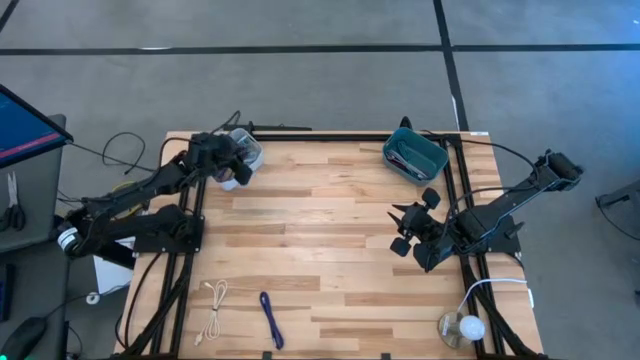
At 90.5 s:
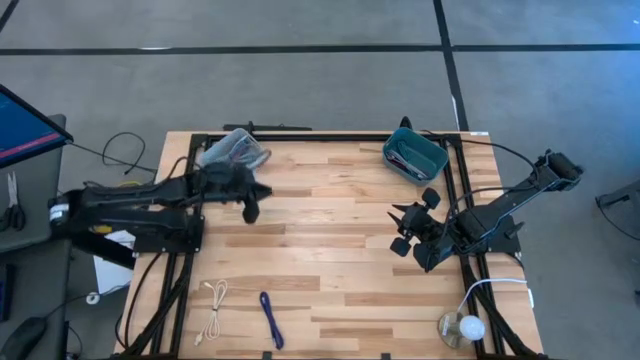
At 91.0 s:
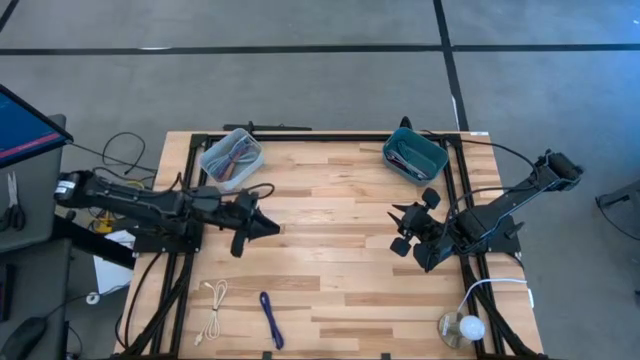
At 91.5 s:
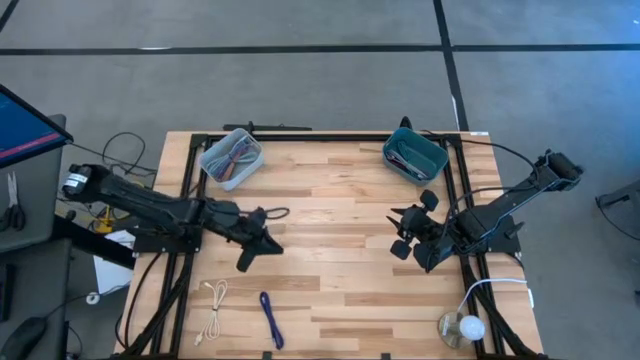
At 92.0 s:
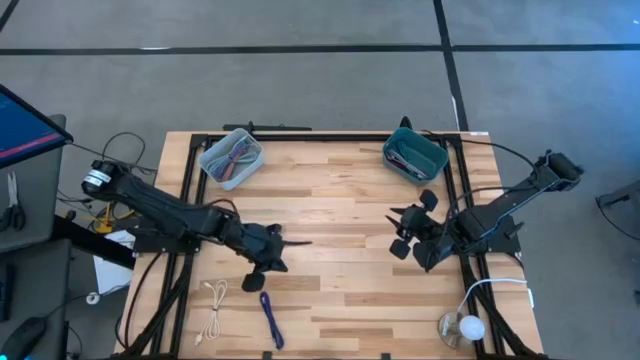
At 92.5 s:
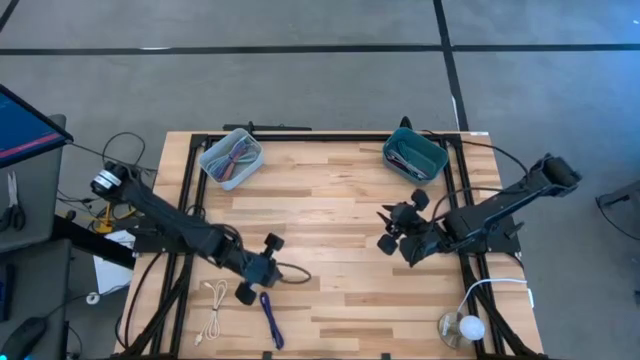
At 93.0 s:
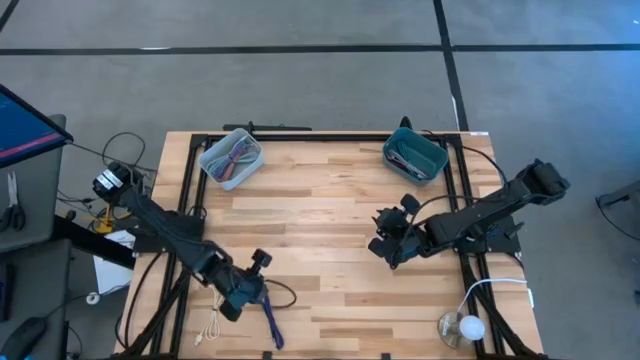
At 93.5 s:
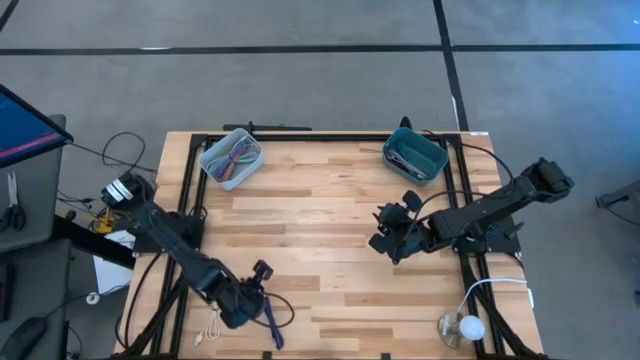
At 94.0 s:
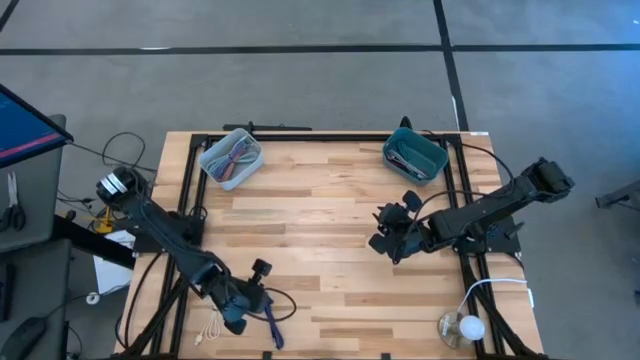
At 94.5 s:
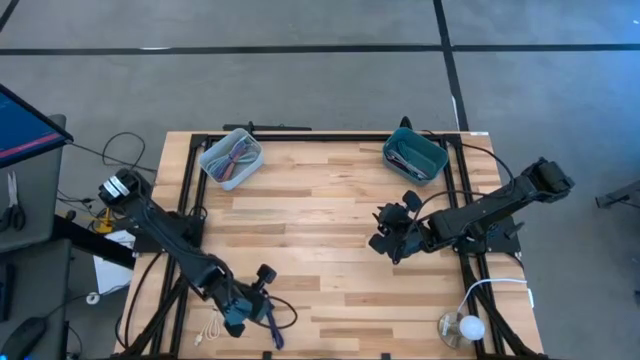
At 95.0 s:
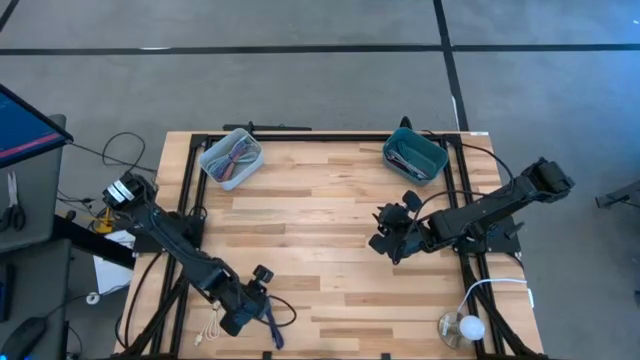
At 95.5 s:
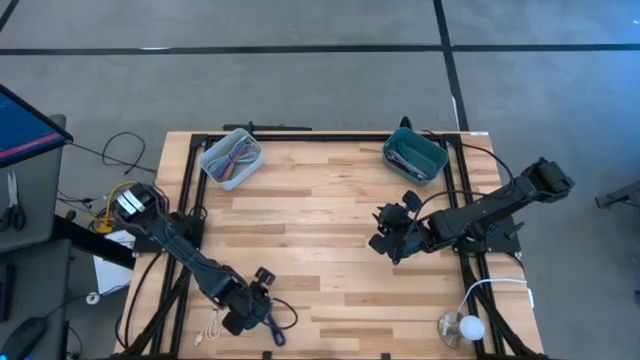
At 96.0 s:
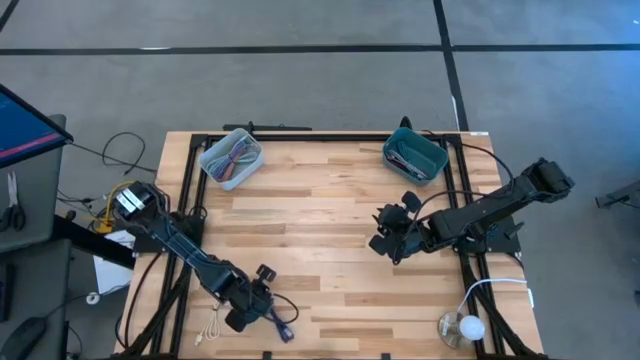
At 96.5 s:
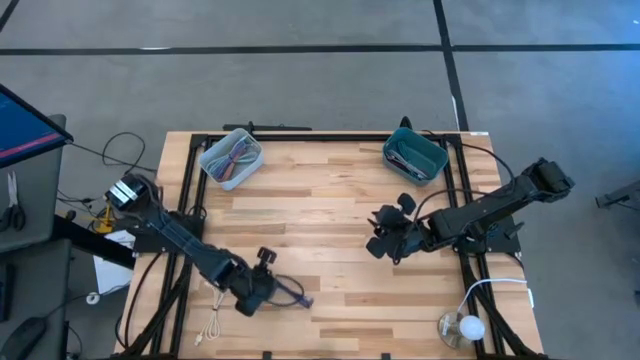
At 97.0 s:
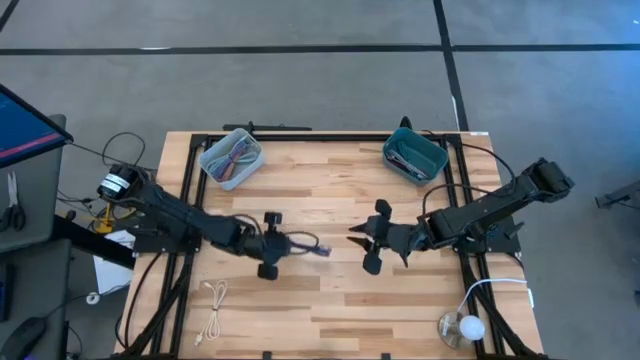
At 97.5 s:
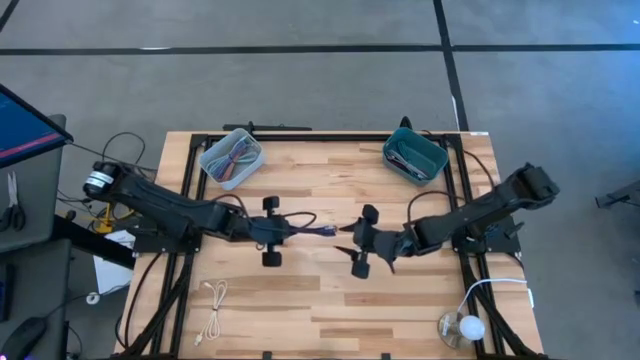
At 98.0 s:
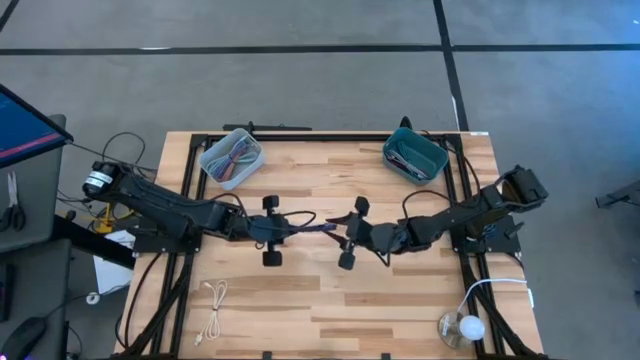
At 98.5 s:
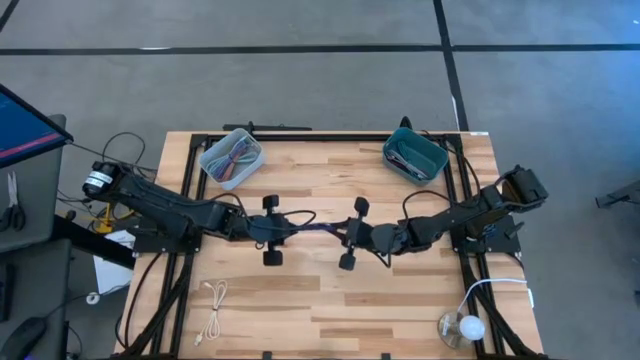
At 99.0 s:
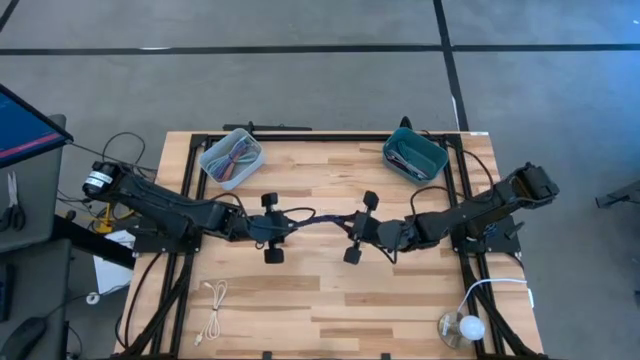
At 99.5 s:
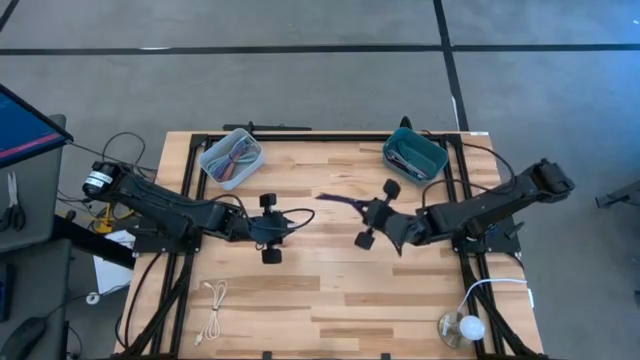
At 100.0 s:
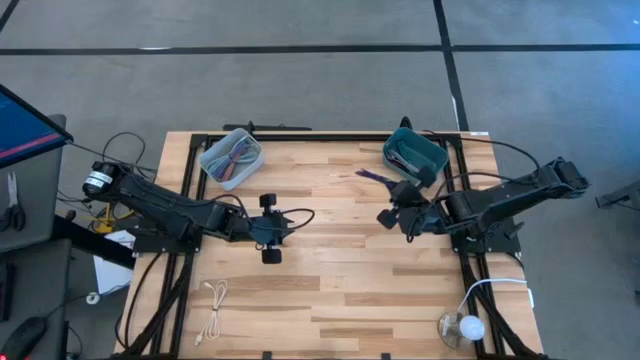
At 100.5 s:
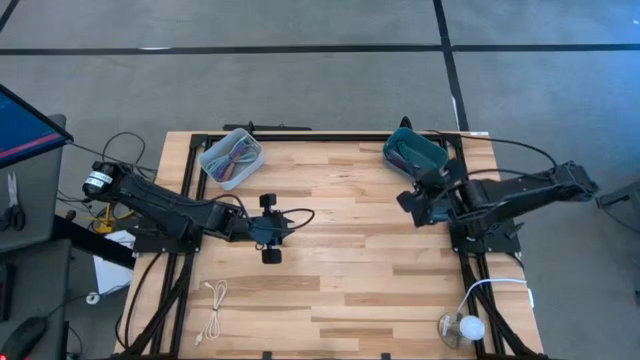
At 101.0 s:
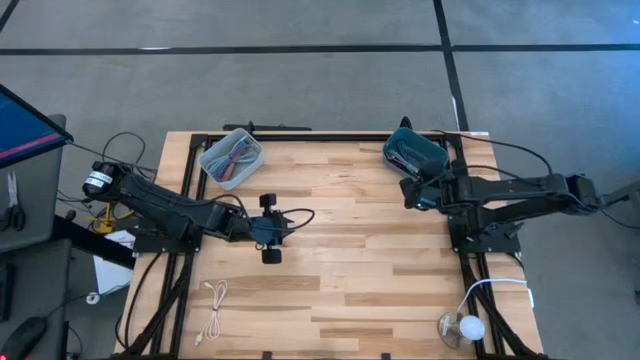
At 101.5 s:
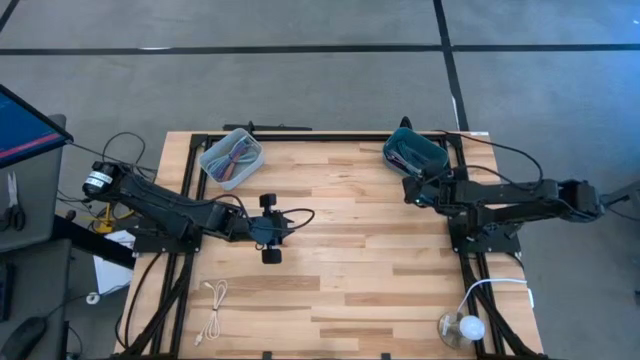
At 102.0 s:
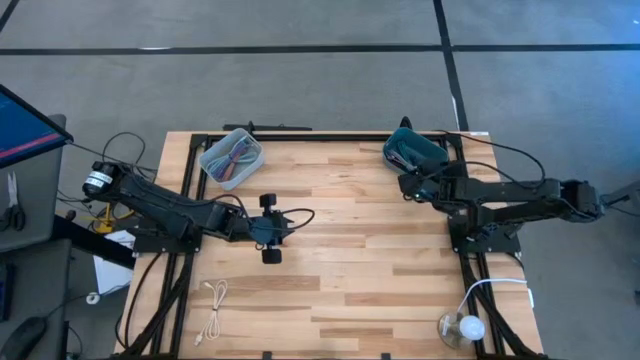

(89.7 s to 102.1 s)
Task: Pick & Place USB Port
Put the violet charger cable into the green bin

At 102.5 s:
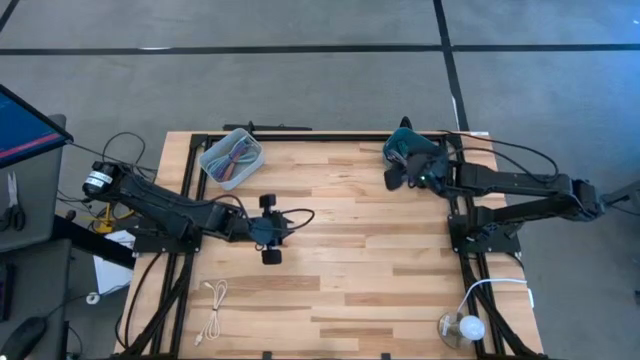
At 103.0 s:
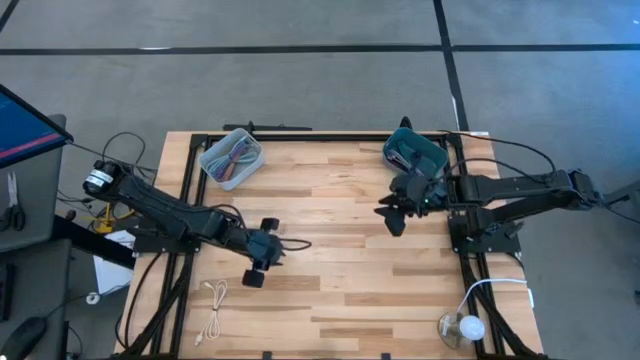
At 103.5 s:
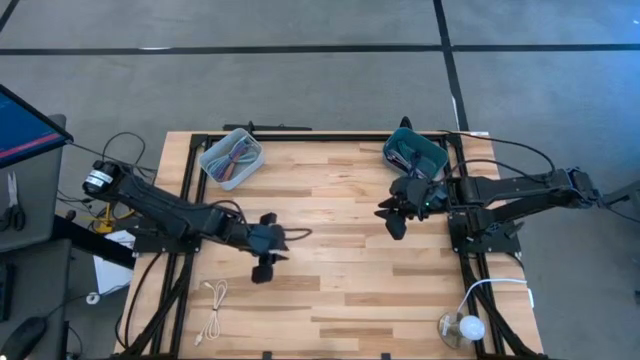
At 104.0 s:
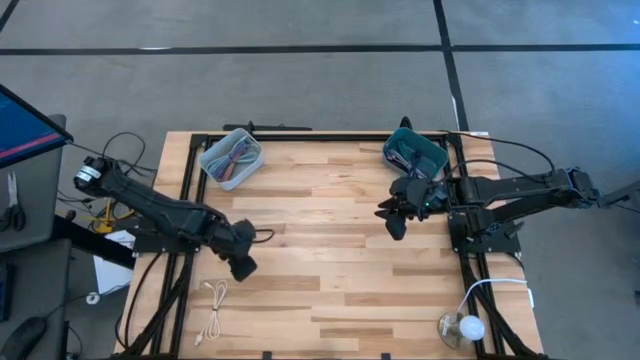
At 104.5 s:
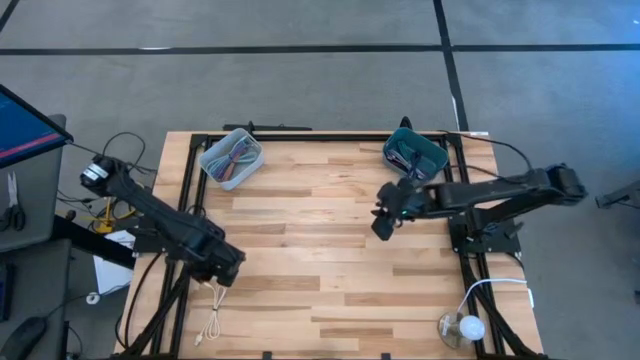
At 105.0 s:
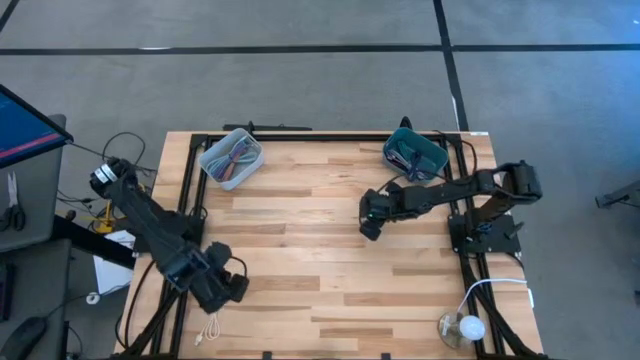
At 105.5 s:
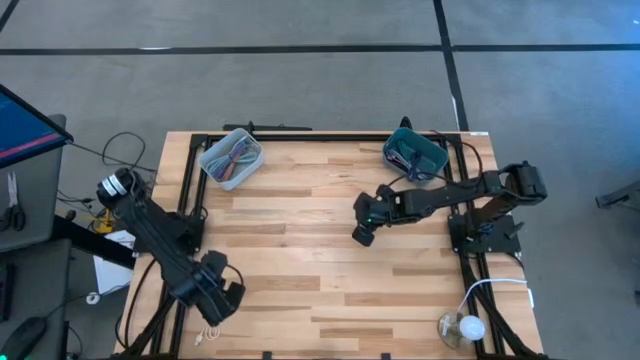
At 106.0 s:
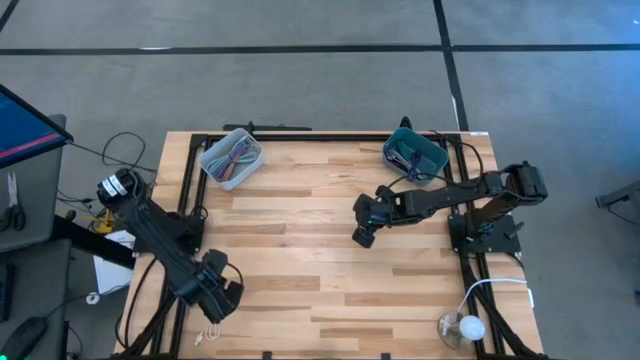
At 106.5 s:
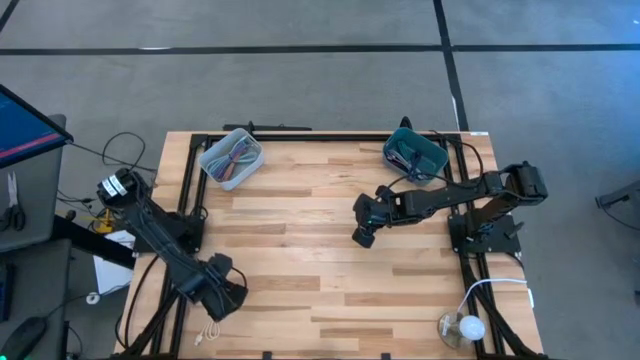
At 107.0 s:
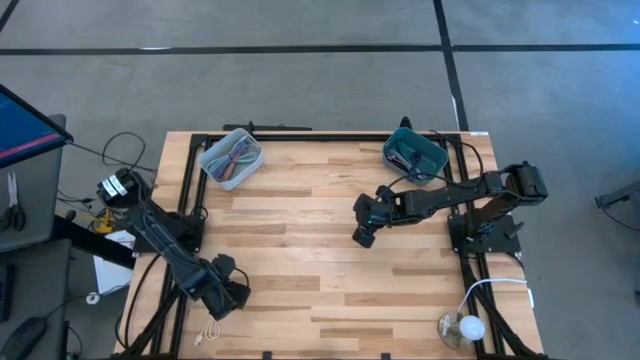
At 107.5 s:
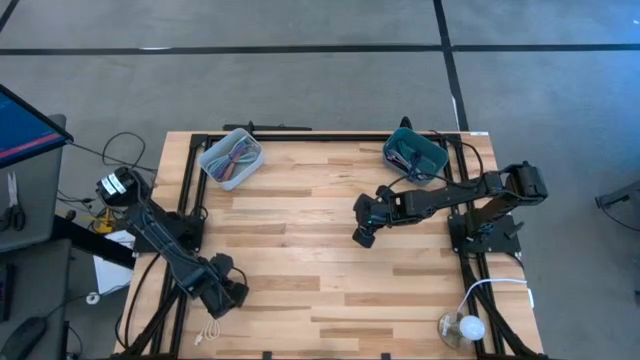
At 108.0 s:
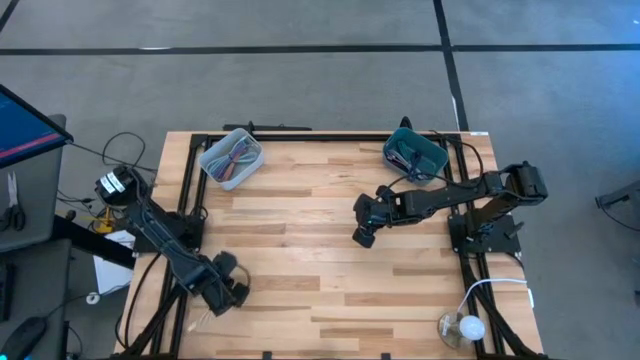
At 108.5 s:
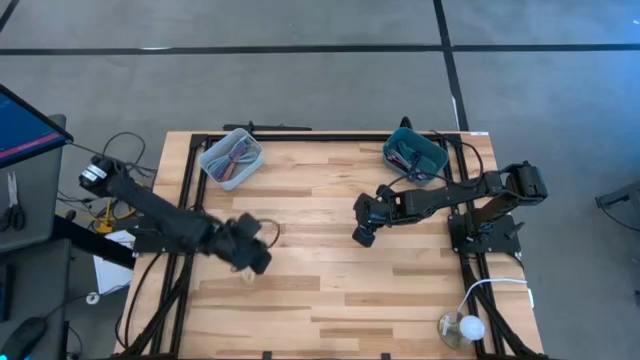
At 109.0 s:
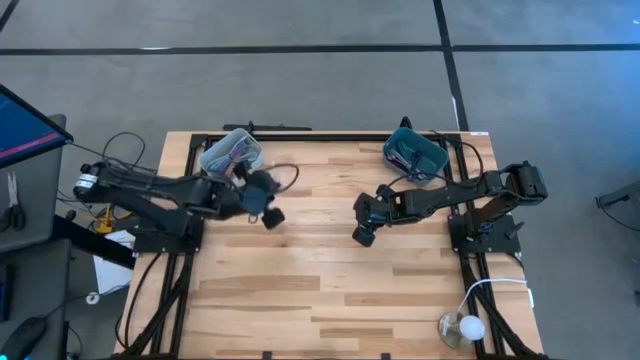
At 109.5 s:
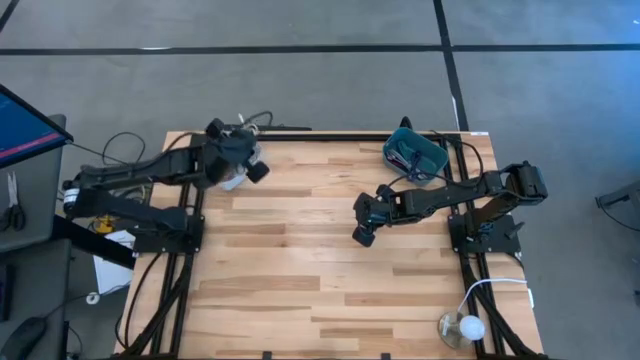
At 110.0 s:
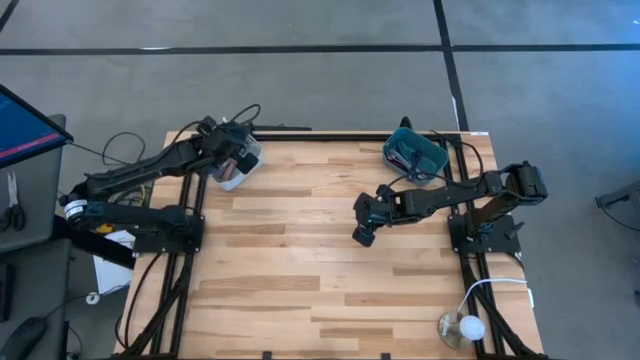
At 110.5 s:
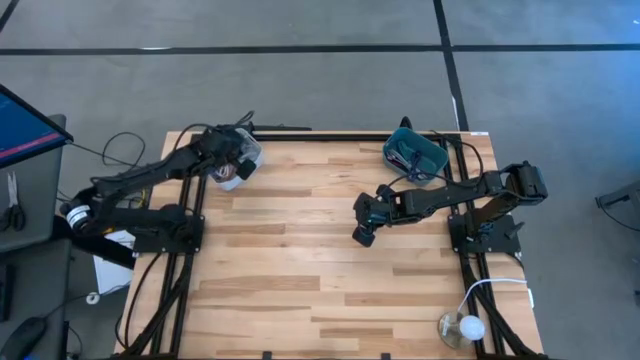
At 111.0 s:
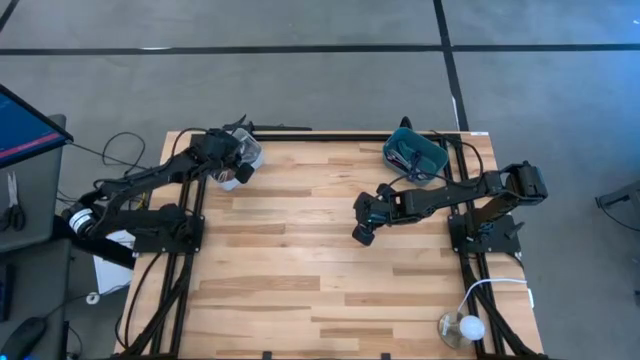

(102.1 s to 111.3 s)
Put the white charger cable into the white bin
